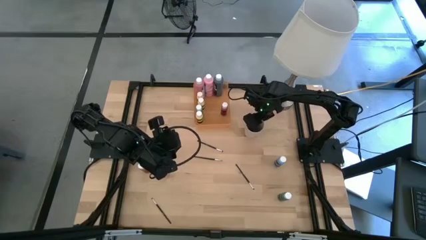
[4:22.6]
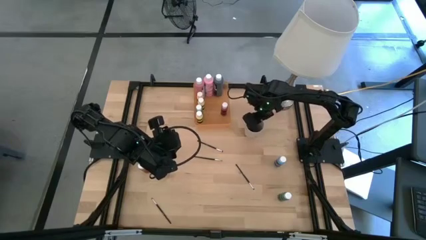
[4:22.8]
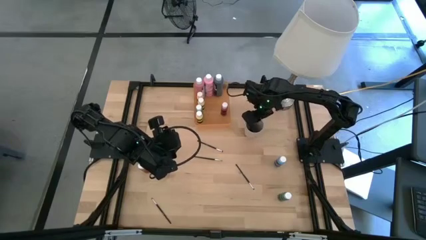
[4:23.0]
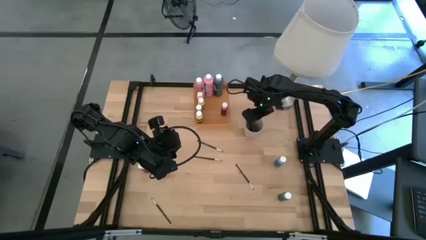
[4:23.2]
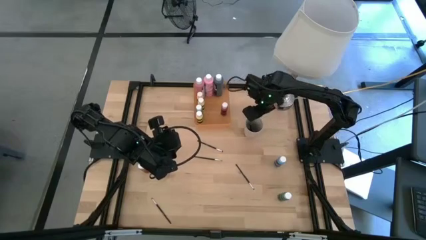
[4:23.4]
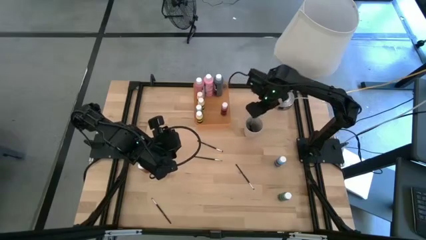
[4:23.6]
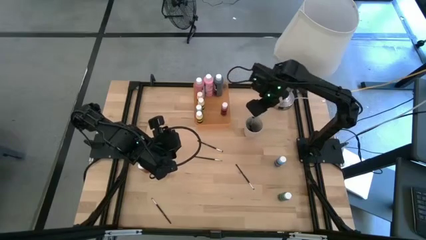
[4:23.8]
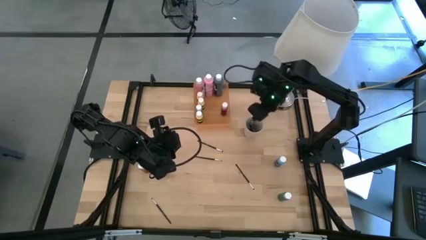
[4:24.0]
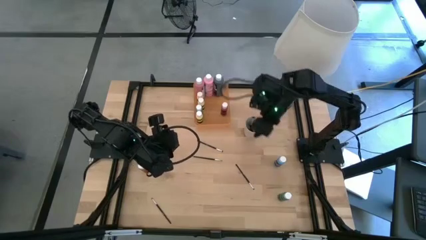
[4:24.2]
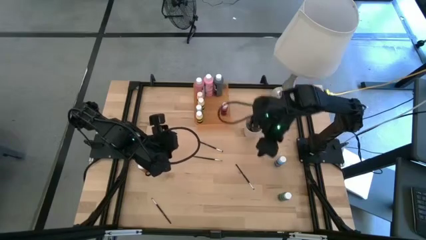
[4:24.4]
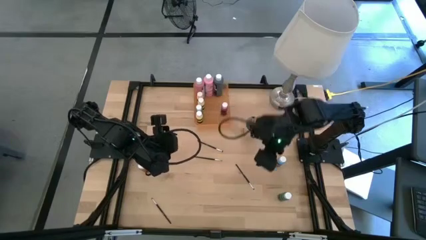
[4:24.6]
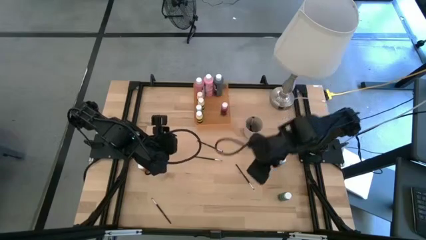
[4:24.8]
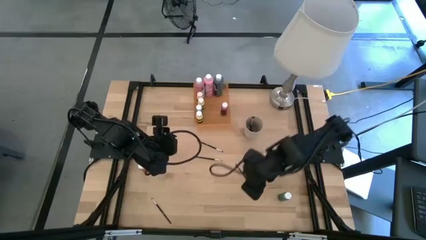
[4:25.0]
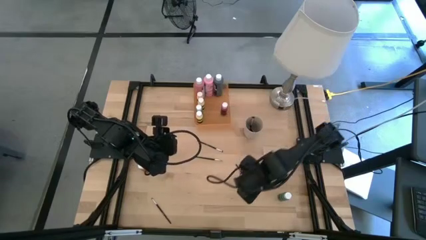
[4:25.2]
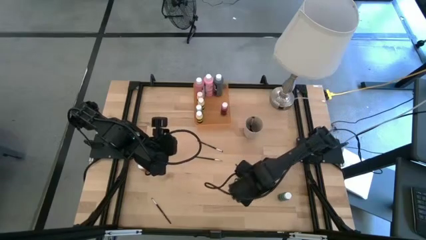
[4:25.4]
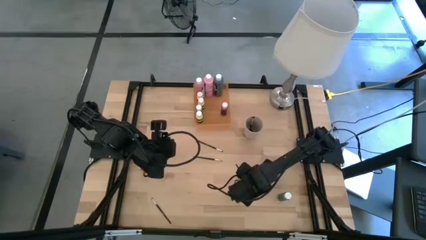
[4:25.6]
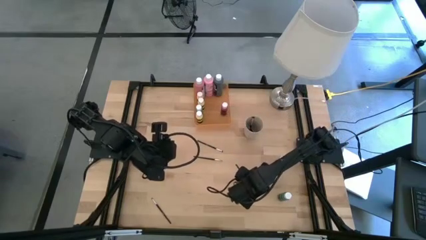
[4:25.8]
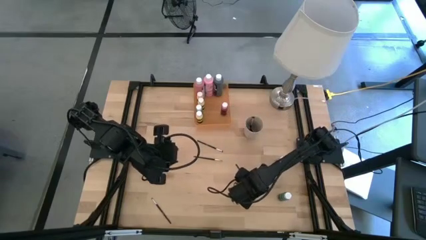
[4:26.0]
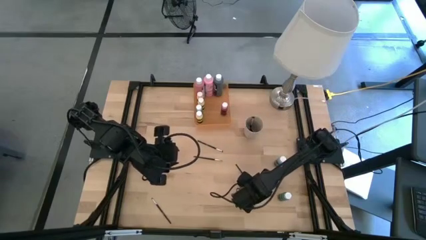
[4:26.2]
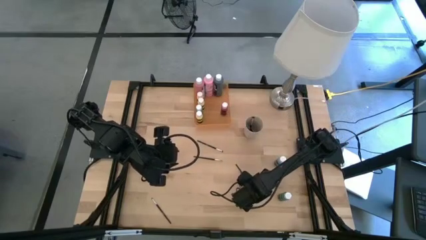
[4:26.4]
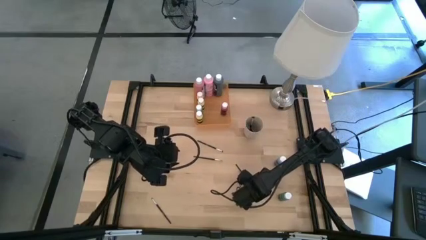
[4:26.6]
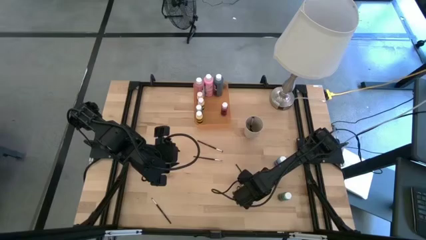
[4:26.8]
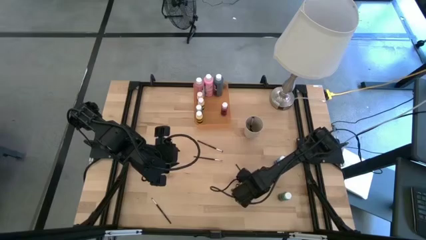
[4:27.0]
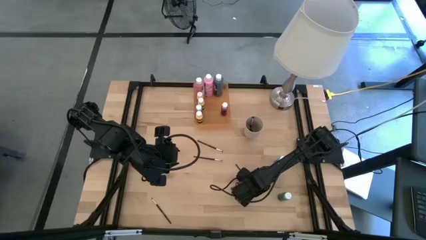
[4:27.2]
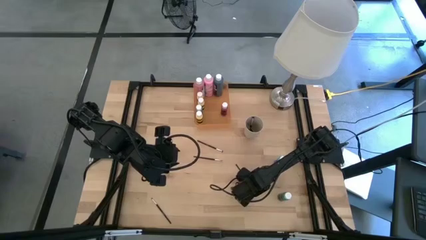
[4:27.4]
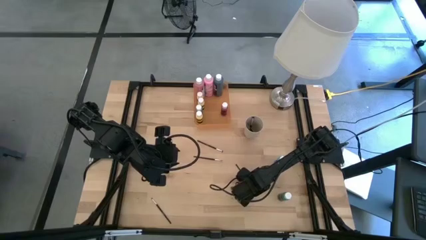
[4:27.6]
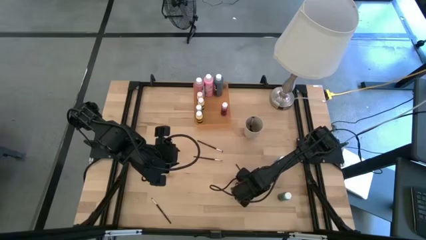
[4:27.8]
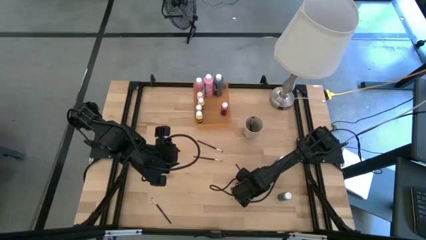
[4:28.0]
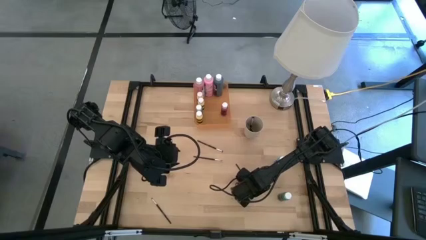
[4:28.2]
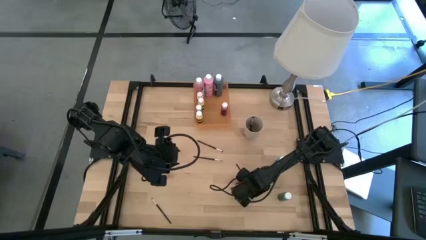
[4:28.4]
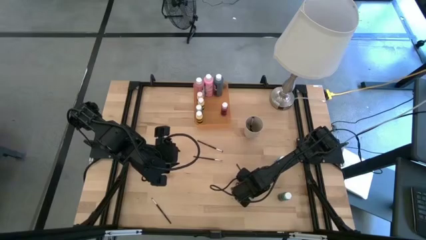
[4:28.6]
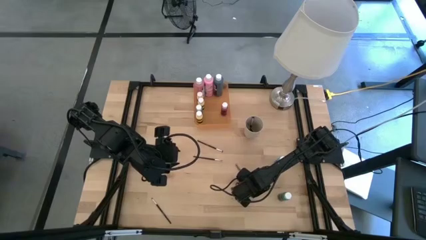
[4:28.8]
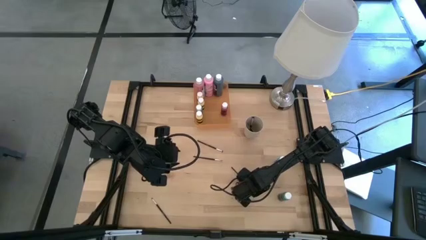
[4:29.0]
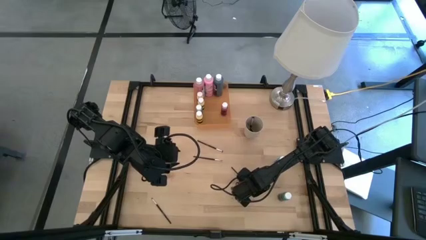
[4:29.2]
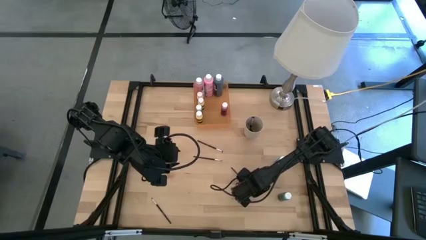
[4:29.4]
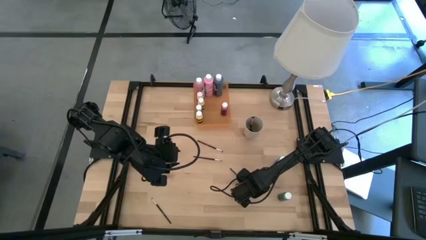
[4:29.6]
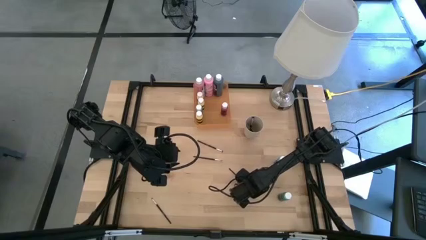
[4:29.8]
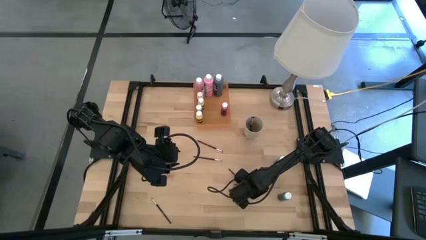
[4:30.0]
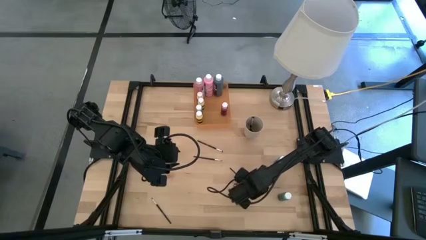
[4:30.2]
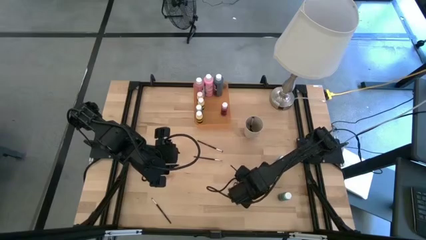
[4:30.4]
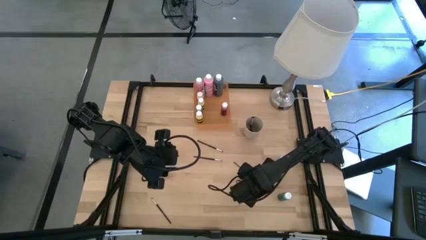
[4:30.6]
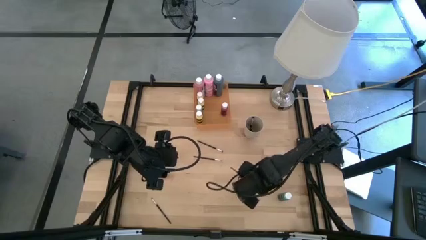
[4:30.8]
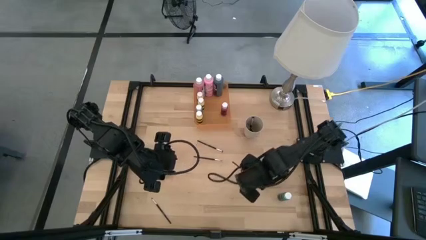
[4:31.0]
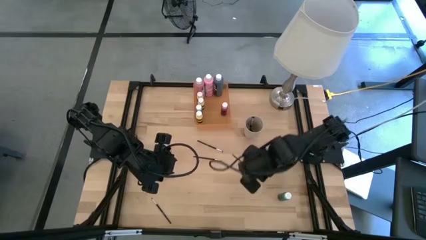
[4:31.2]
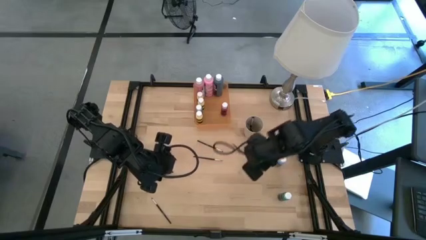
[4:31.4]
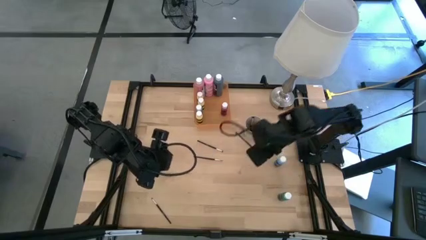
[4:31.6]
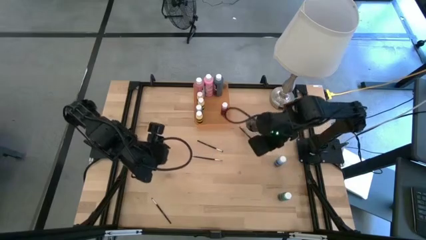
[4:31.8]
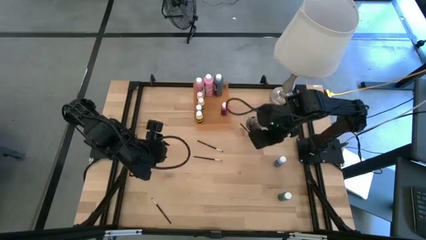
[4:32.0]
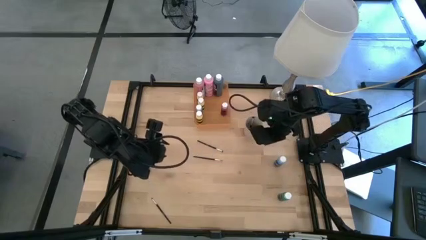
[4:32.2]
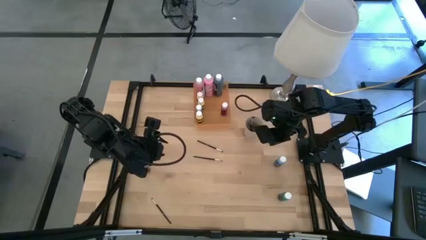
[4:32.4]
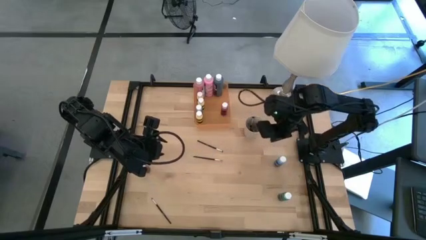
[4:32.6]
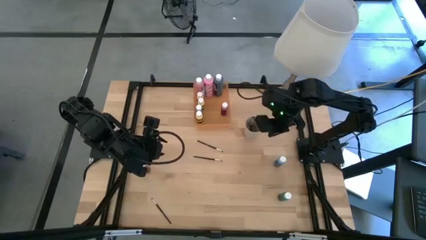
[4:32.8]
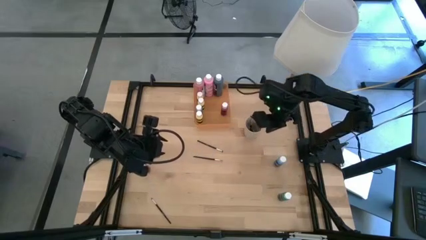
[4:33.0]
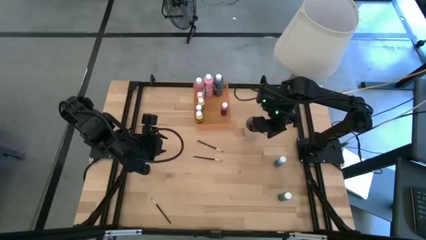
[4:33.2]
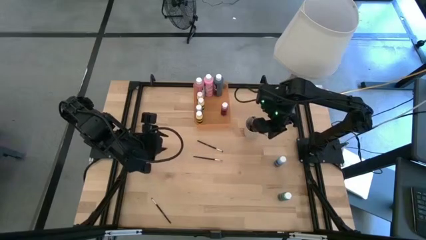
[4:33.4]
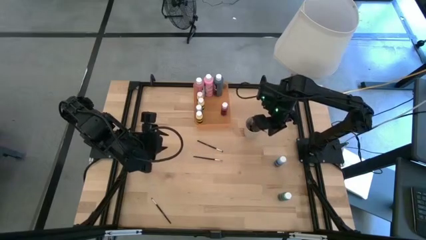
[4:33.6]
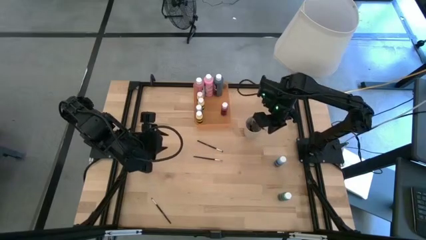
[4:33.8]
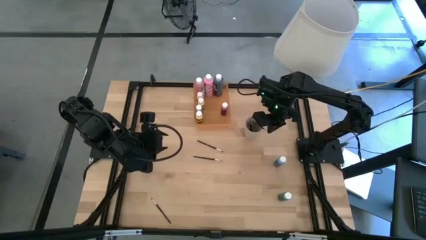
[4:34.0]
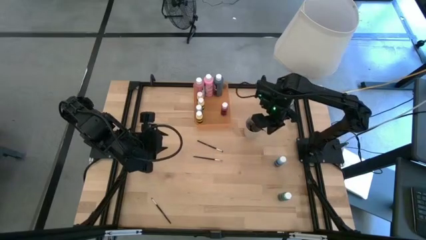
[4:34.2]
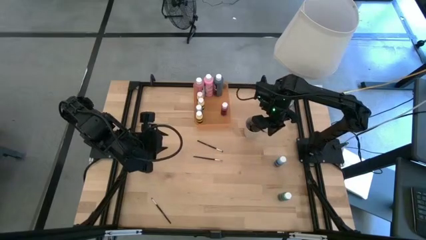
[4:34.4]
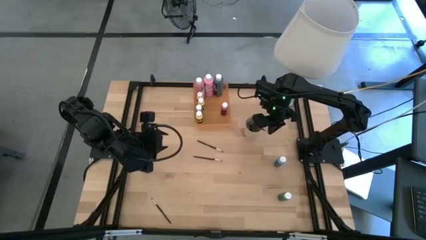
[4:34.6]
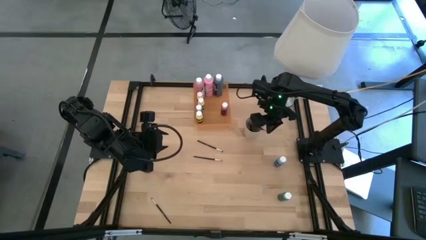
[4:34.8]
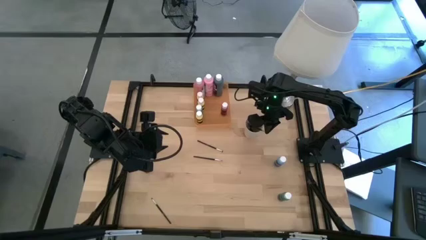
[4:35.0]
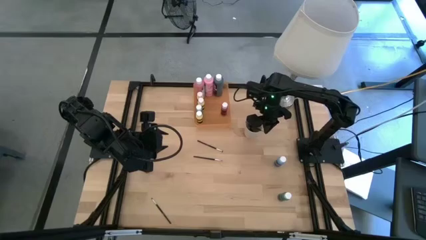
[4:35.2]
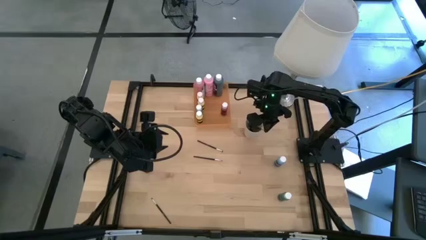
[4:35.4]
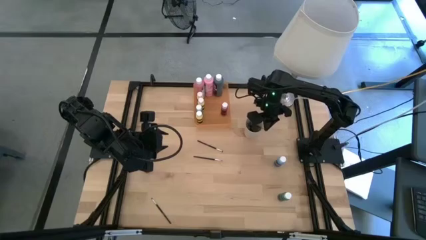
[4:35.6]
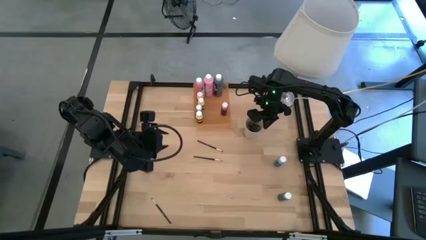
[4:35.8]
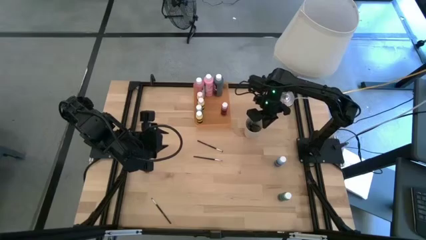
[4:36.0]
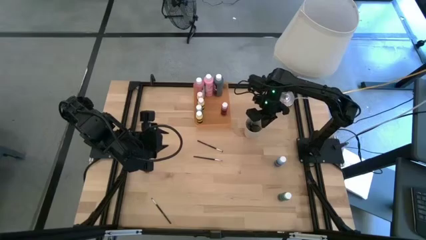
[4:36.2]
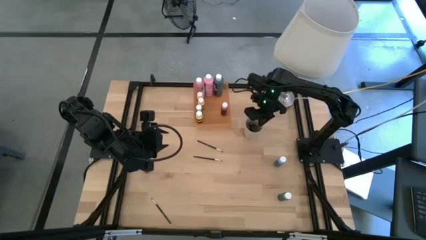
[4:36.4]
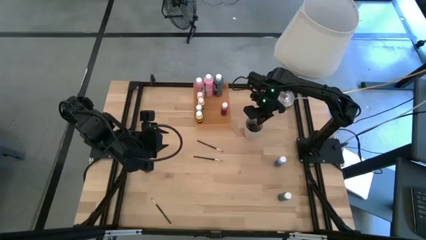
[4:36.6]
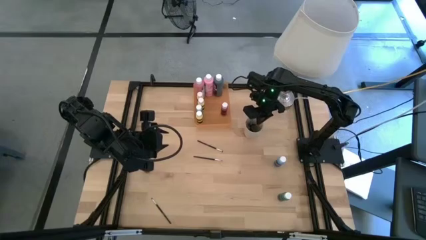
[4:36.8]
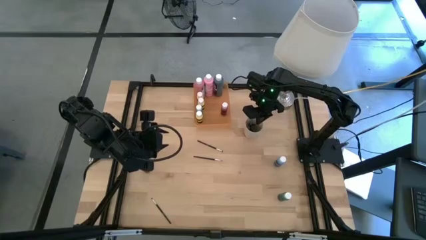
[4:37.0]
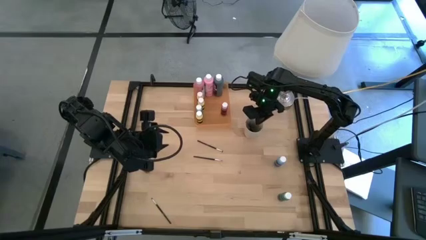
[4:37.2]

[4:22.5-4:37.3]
Task: Pick & Place Paint Supplies
Put the black paint brush into the light brown cup

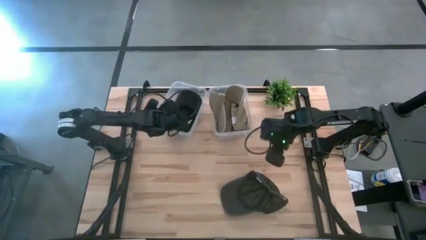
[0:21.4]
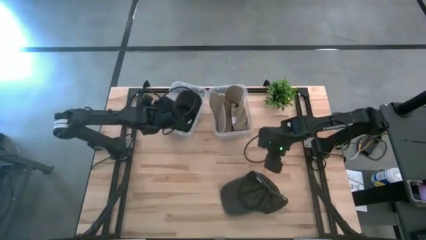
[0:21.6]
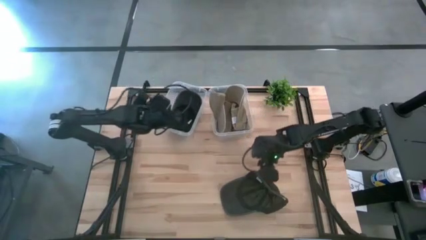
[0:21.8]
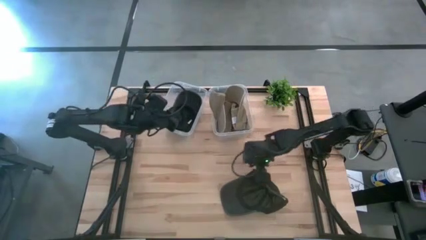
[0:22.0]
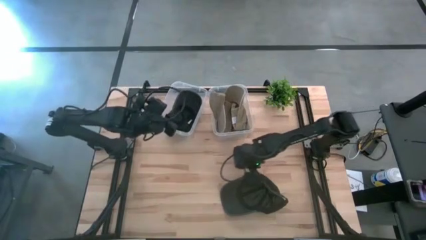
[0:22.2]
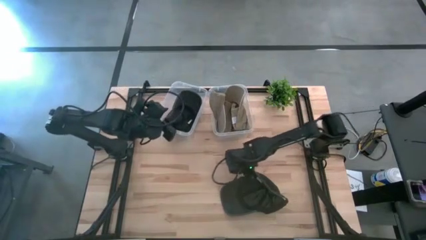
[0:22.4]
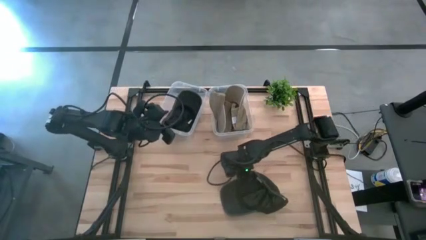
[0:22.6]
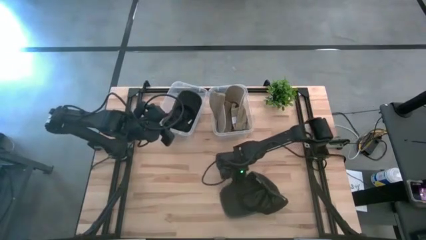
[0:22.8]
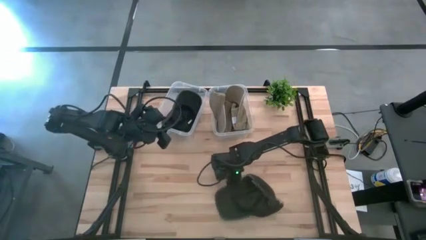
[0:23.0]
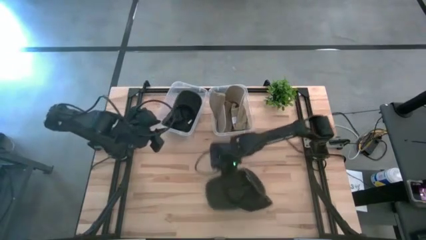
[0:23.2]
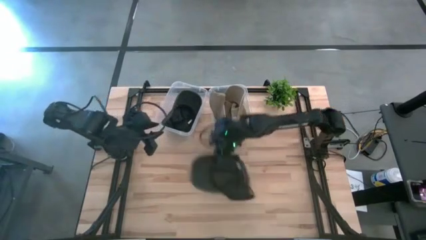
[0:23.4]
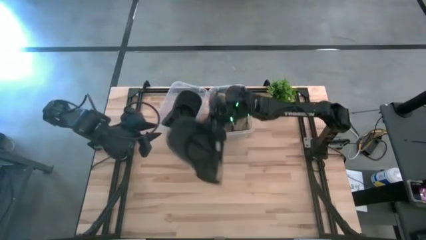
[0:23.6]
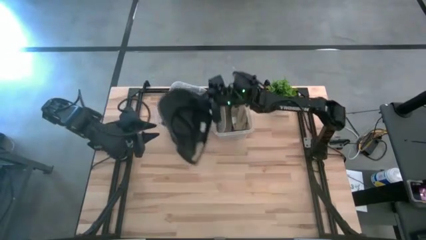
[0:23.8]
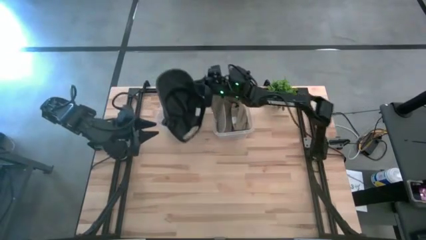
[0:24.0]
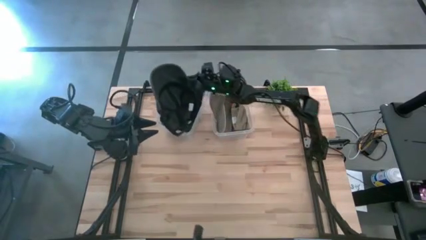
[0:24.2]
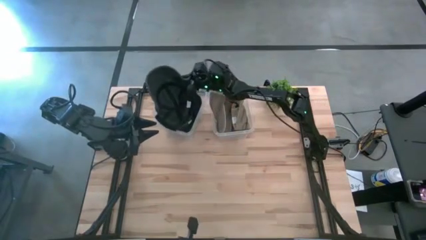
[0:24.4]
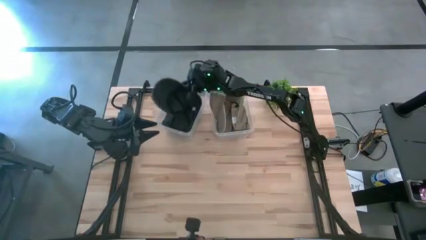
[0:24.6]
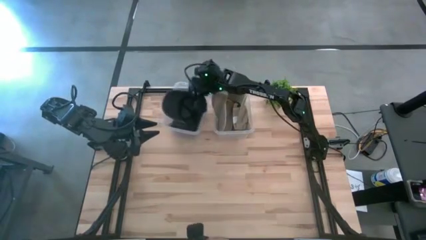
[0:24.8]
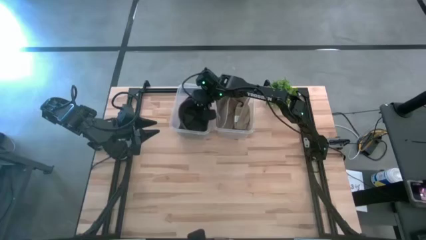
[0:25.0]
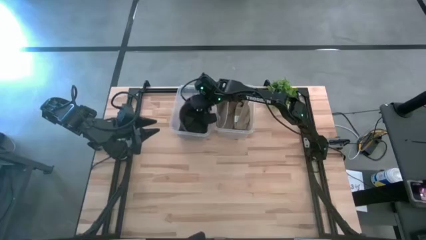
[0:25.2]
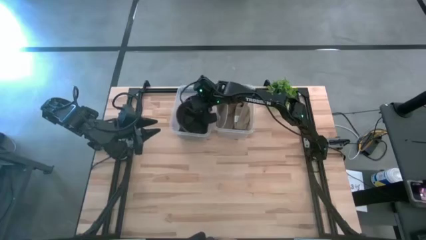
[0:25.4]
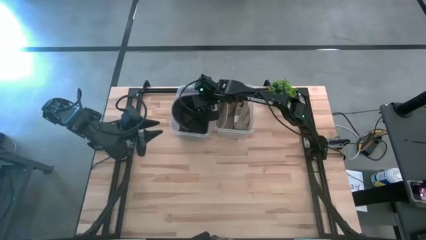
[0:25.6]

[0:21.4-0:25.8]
Task: Pick & Place hat
Put the black cap into the left transparent bin
